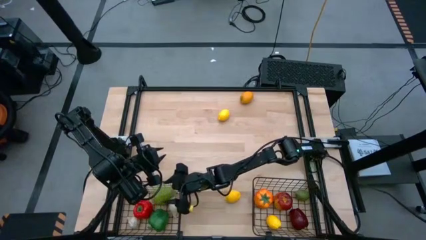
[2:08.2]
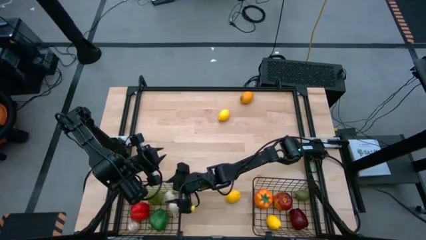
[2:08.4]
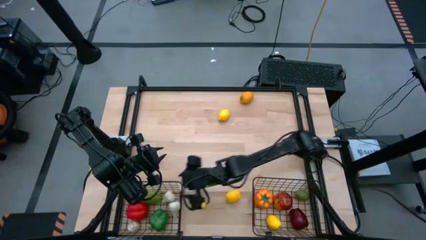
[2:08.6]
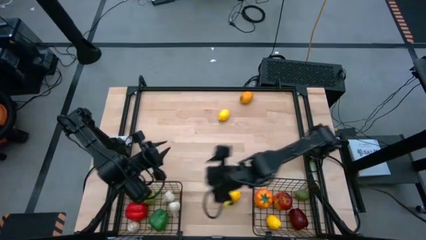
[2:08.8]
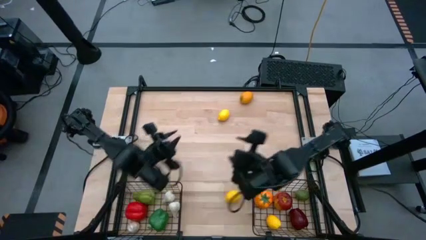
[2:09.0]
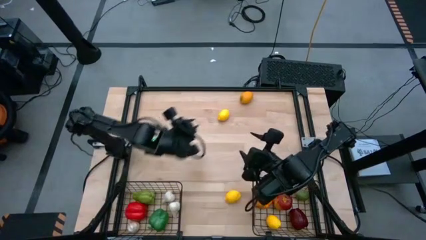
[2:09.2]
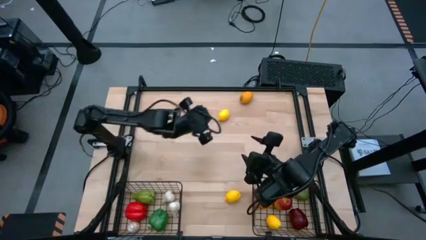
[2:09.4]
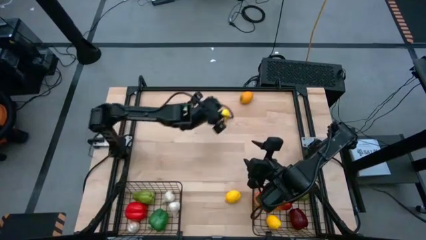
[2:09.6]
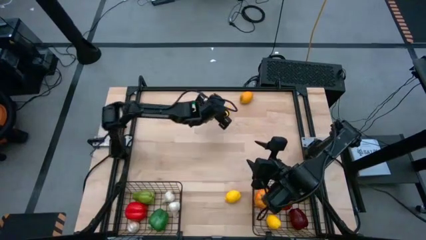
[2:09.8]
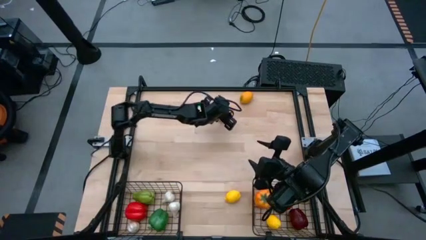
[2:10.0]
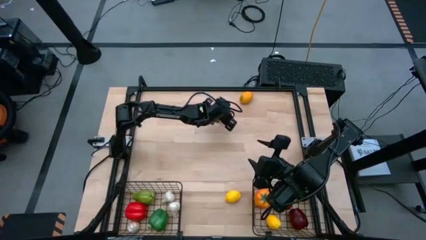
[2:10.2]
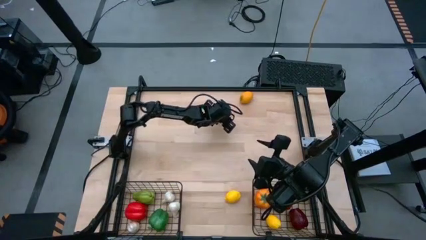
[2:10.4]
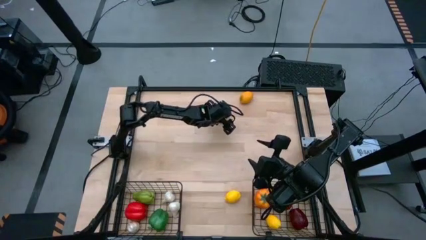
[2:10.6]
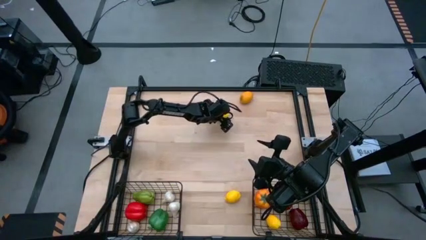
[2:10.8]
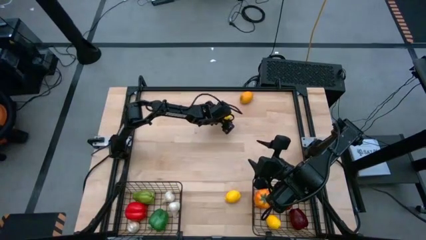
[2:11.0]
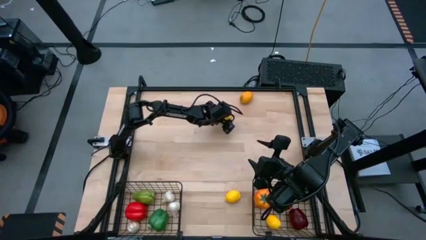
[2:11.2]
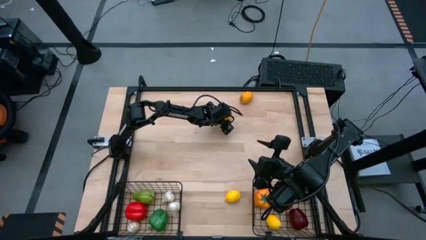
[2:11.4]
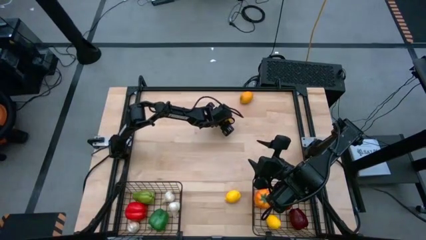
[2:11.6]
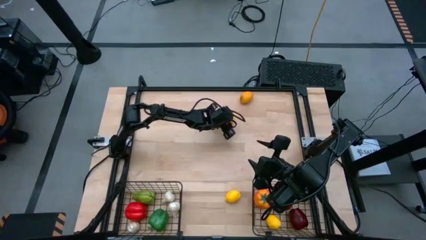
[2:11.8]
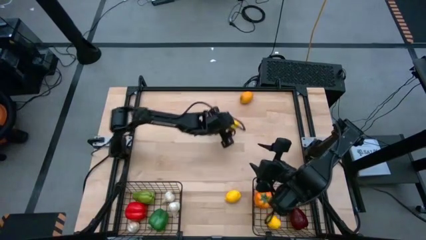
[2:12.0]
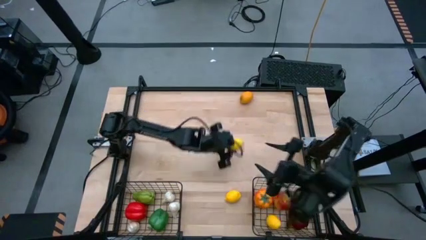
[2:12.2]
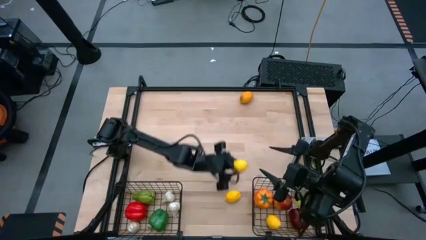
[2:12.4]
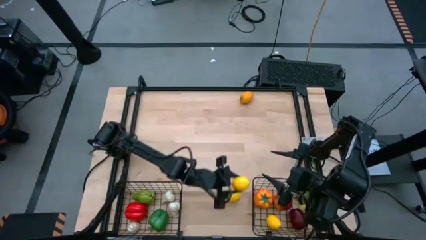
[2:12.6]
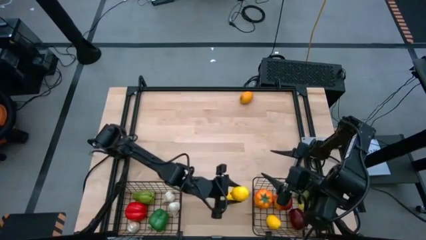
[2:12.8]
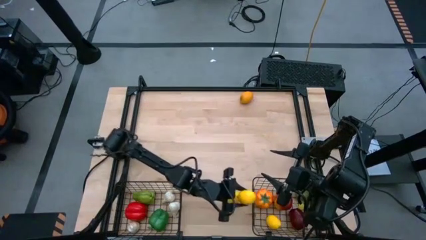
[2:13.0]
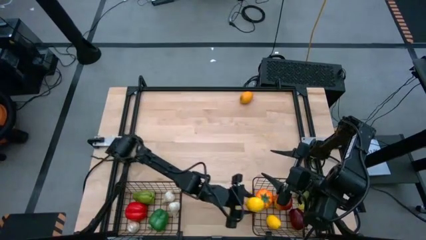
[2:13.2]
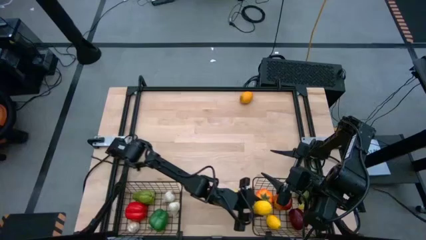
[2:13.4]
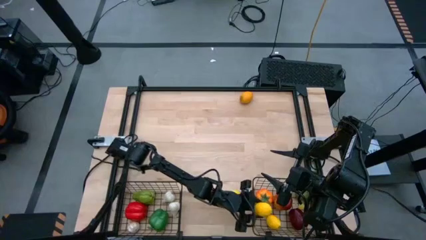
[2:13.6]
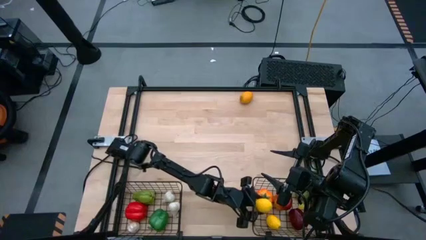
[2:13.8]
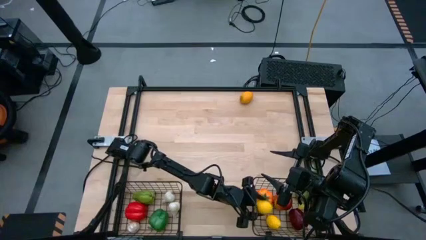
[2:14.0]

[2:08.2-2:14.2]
Task: Sort produce into baskets
Put the middle yellow lemon into the right black wire basket

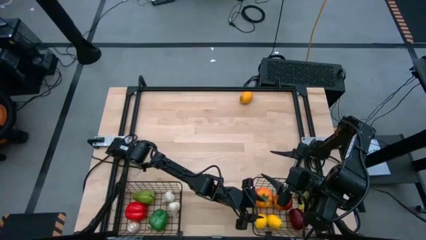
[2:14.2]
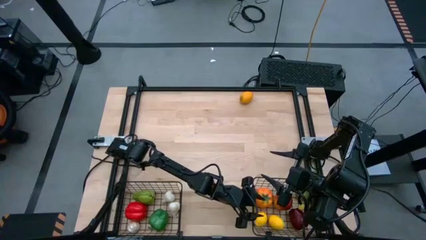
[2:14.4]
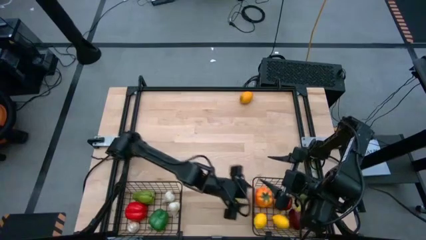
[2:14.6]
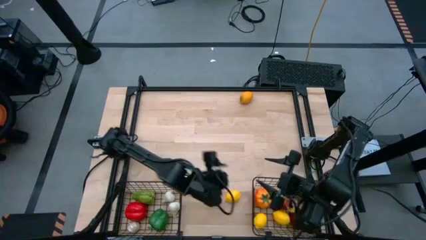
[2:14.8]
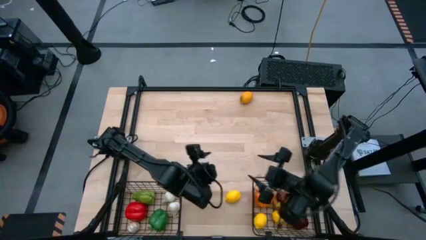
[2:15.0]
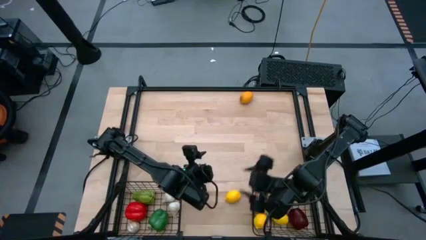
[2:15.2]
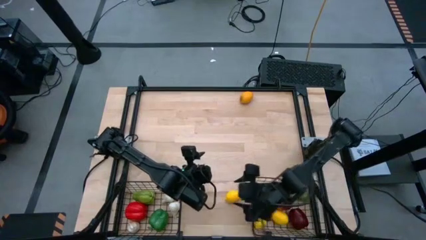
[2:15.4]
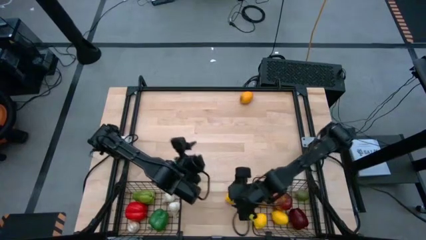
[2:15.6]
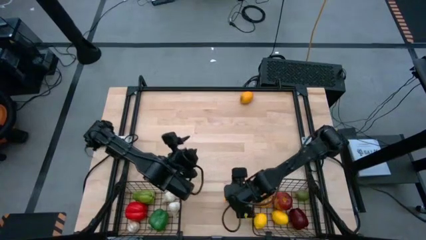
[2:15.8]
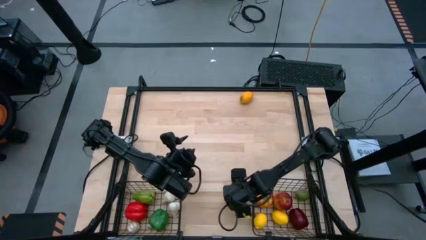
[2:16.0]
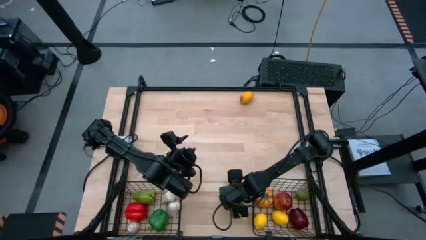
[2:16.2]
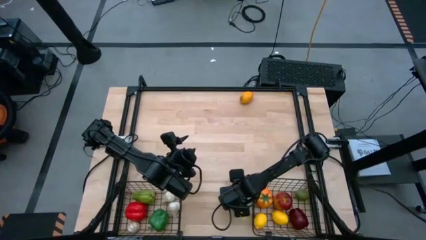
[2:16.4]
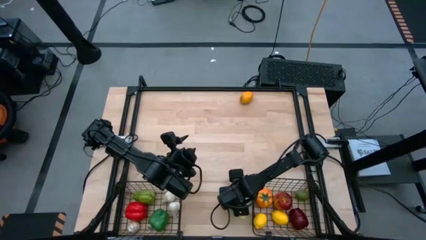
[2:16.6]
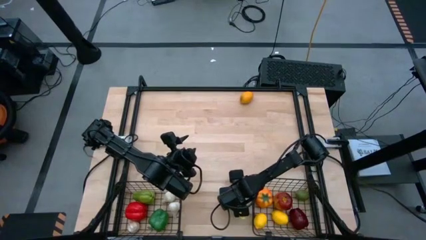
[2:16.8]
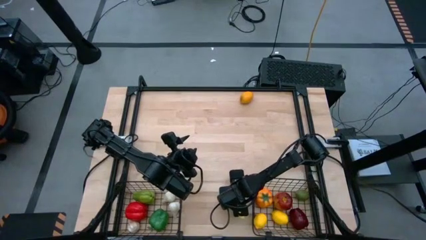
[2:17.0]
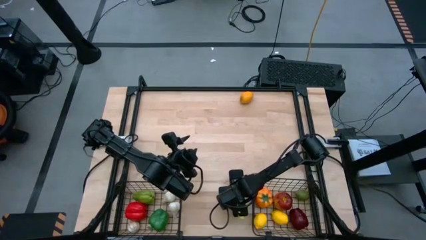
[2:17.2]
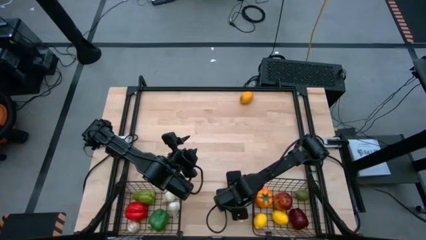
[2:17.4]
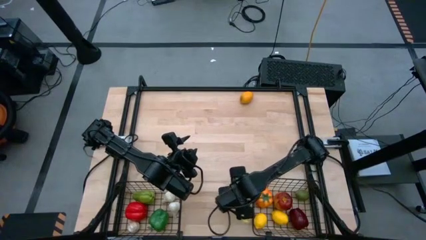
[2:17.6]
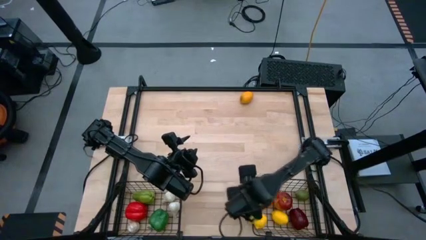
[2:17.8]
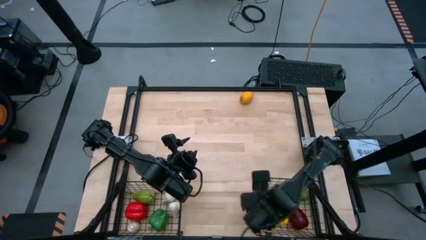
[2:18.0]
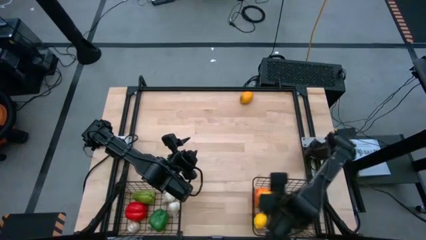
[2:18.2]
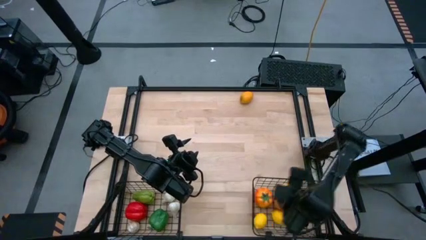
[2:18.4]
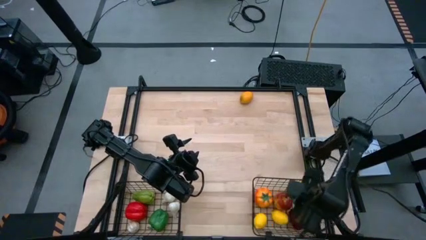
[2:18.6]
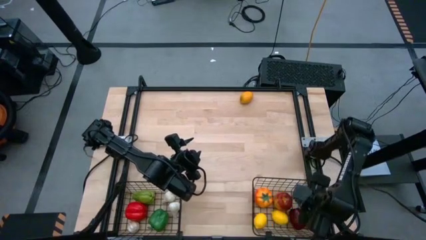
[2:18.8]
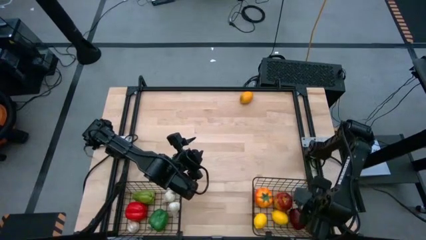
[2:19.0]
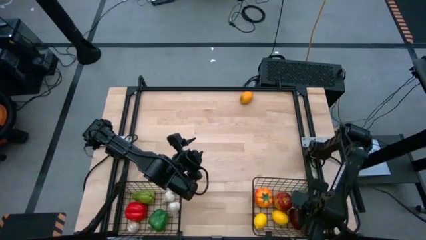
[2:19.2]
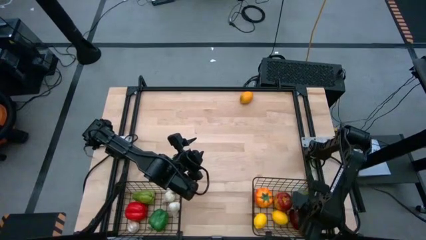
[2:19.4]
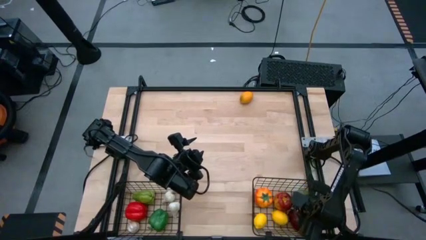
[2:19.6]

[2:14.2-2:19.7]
Put the yellow lemon into the right black wire basket
